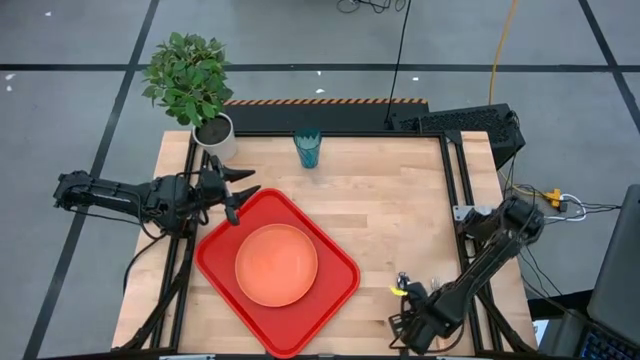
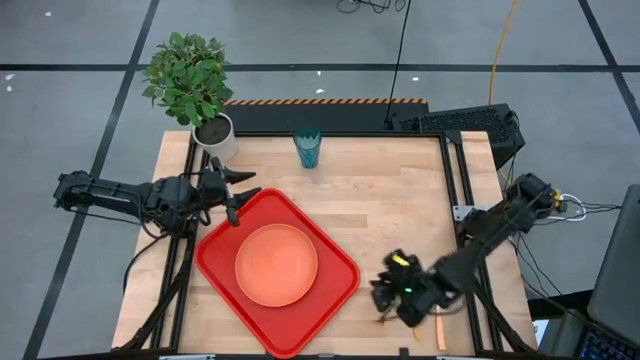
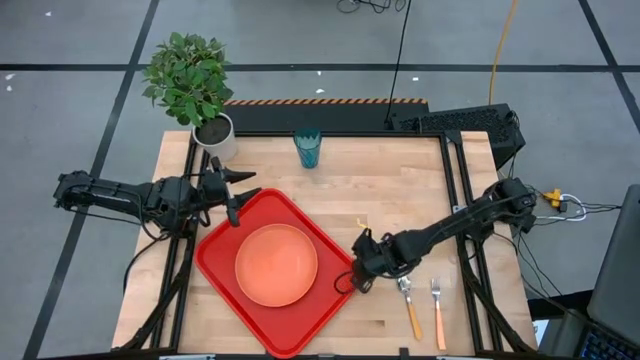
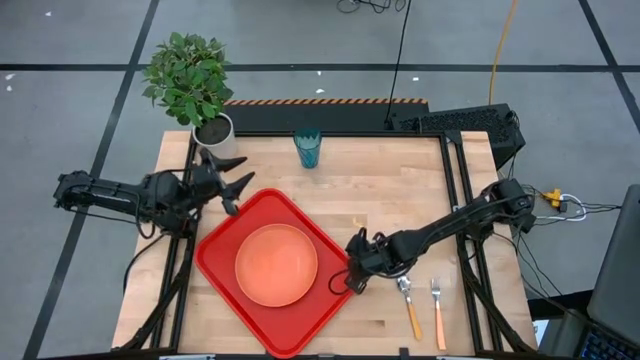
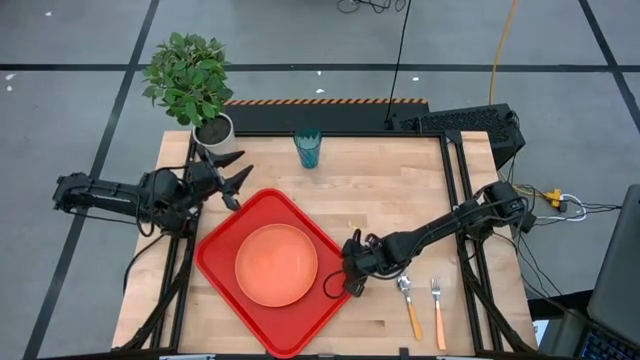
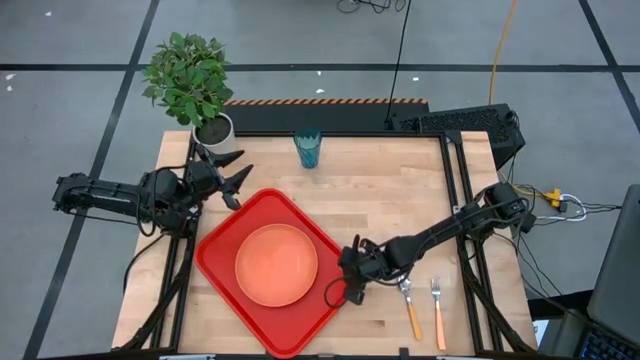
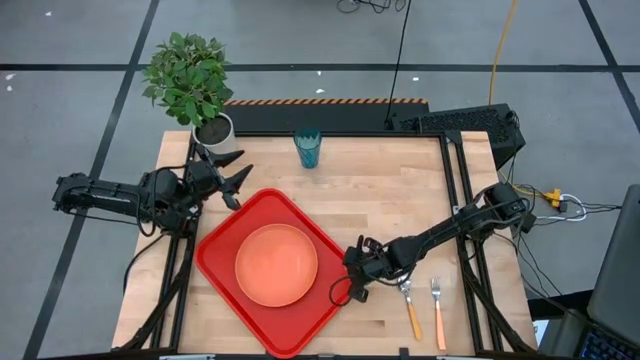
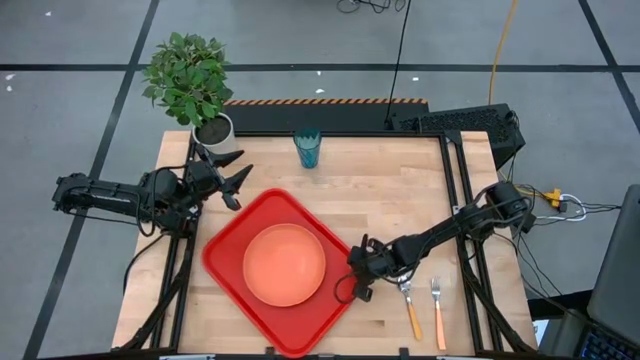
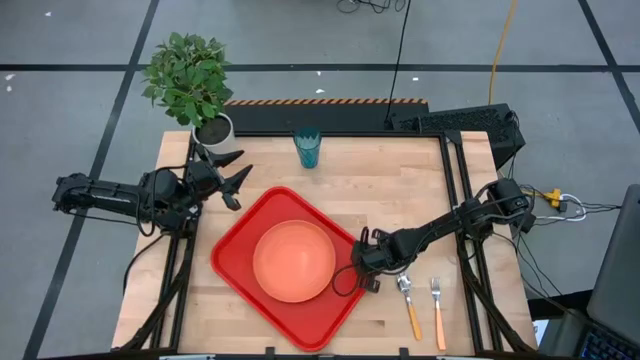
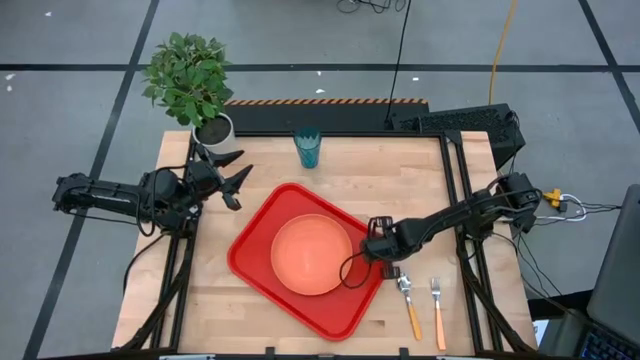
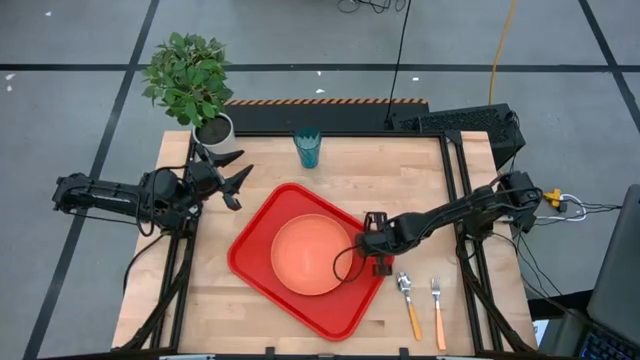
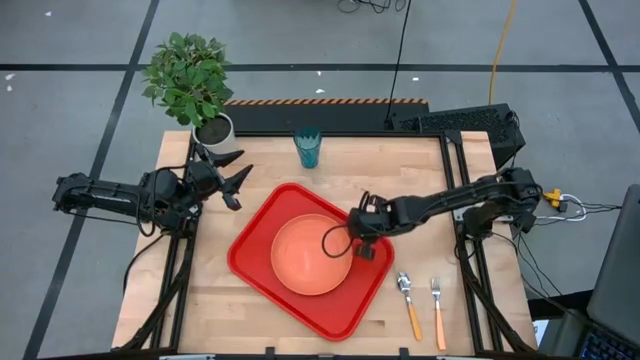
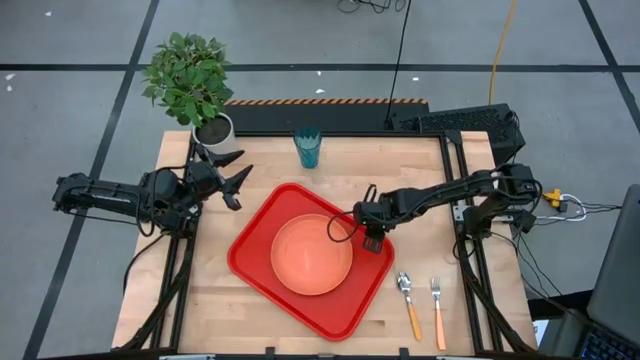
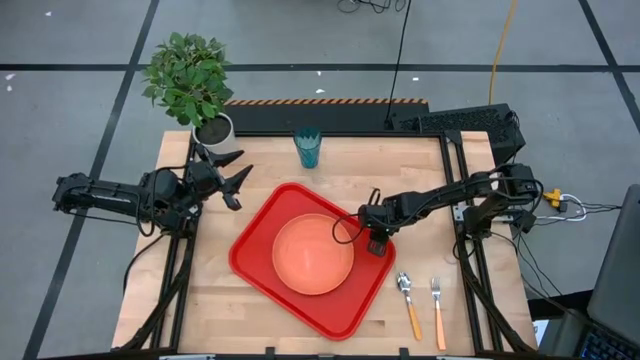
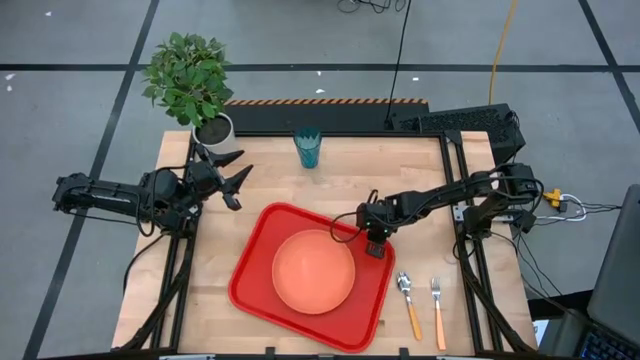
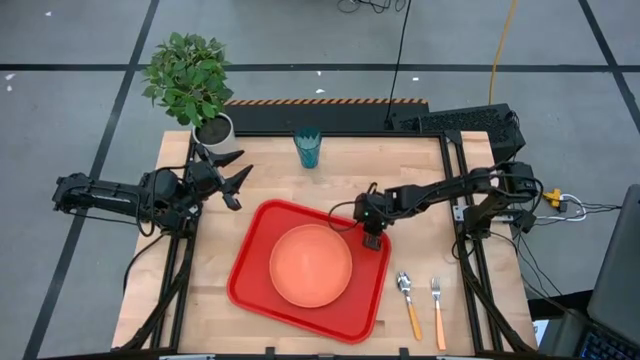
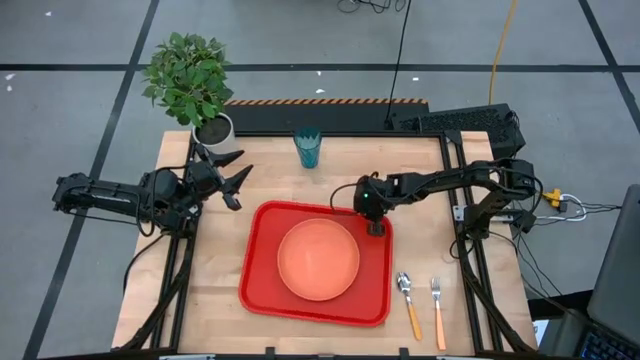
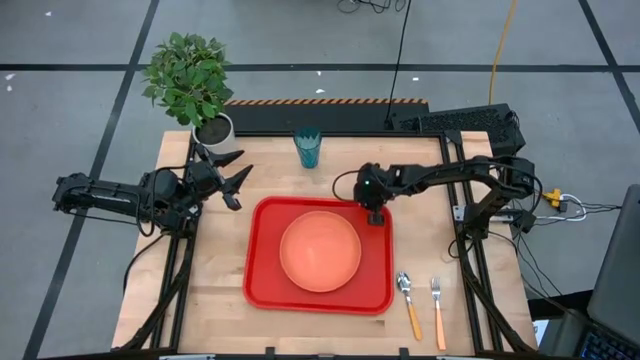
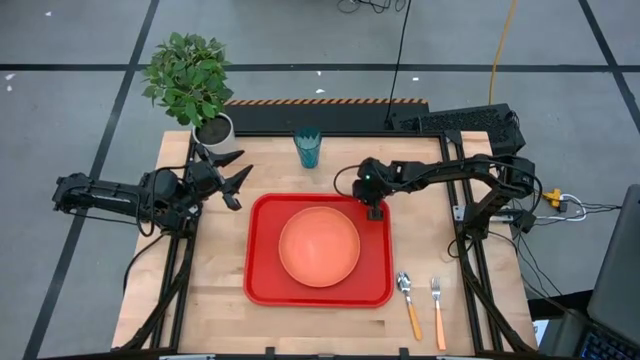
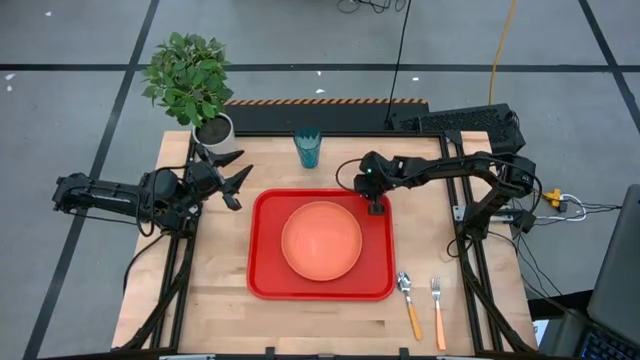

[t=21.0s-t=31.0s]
Task: Pick and place plate/cup/fork/spoon on tray
Move the red tray to the center of the table

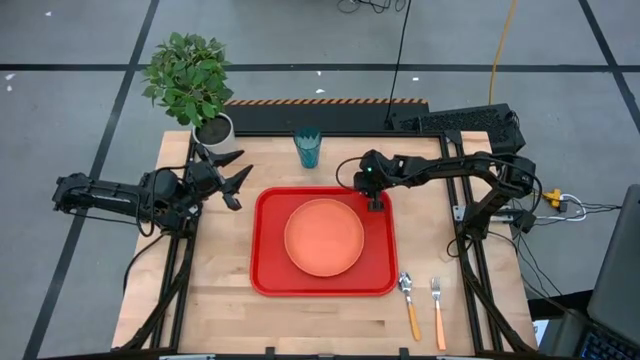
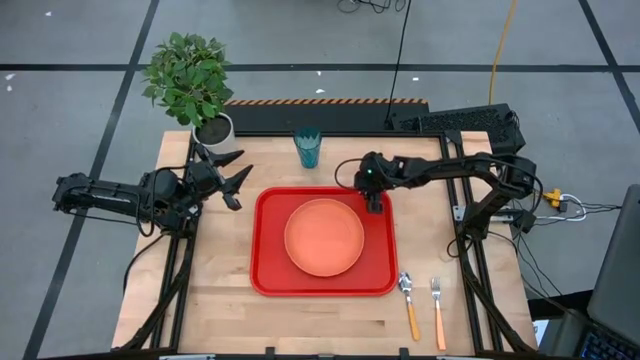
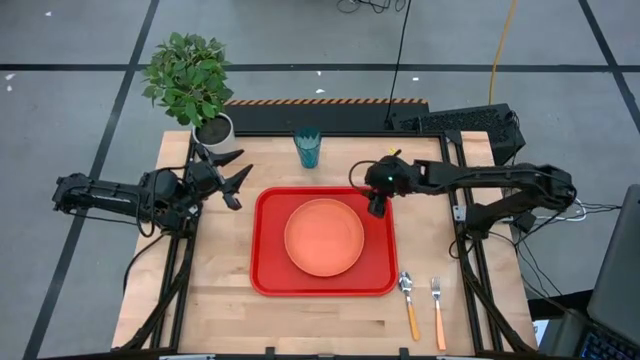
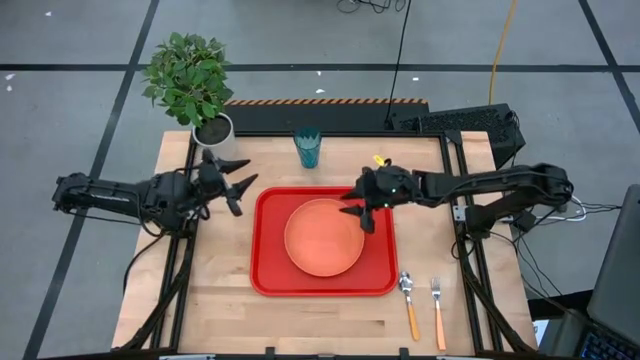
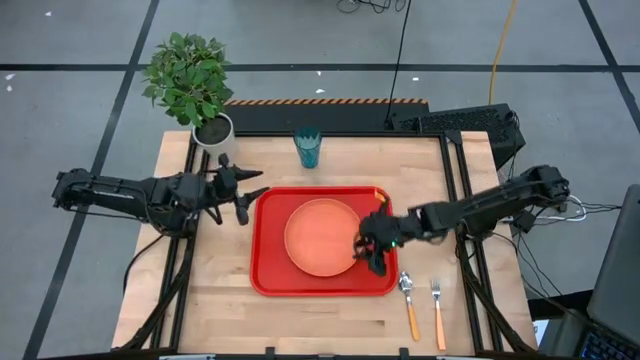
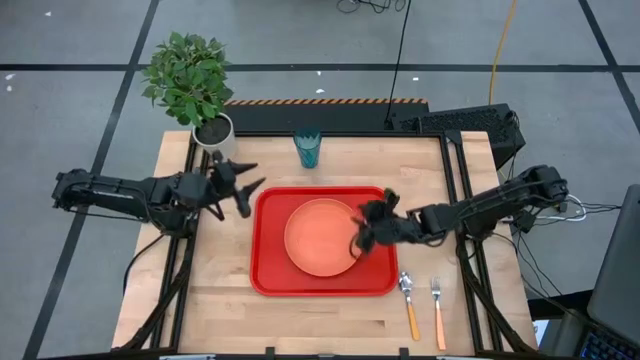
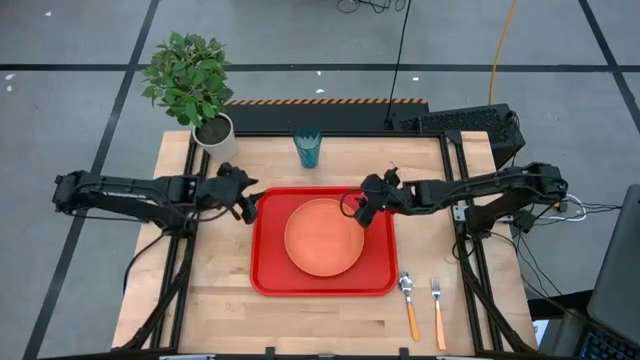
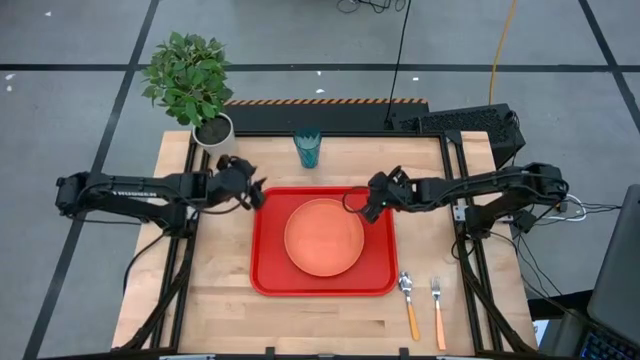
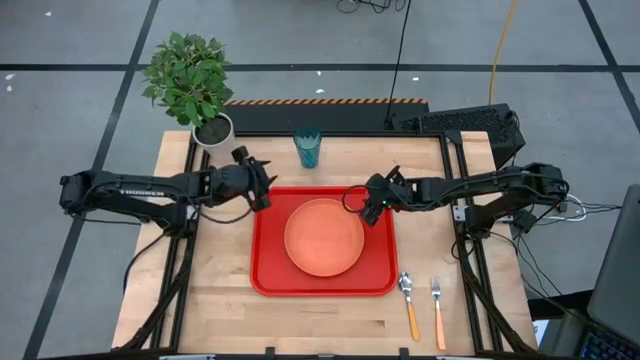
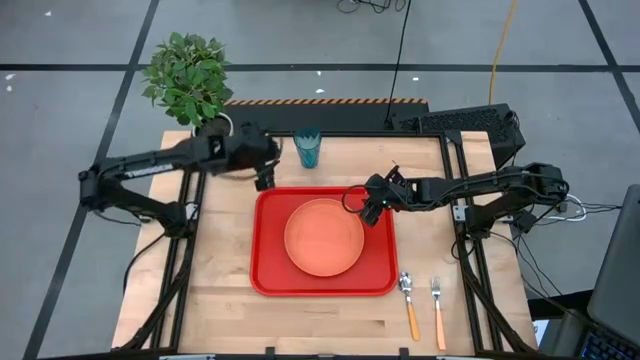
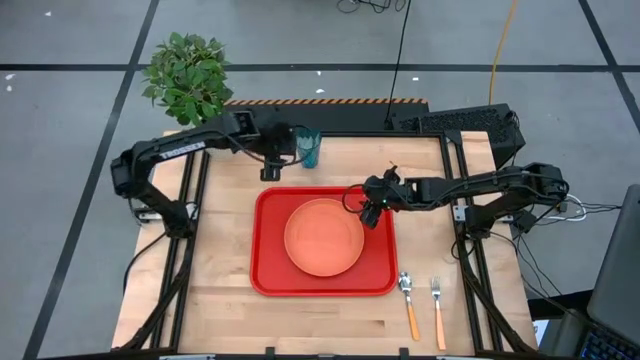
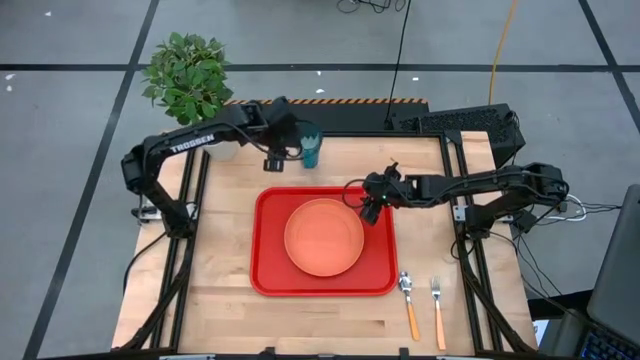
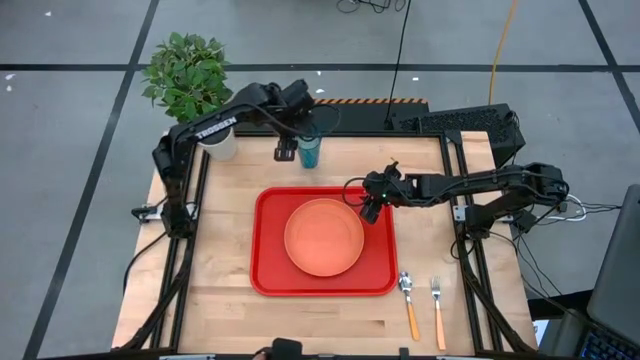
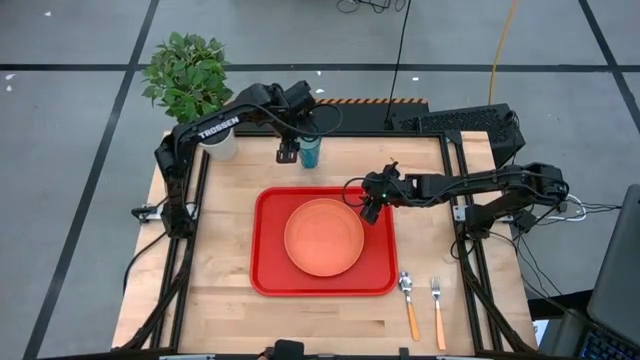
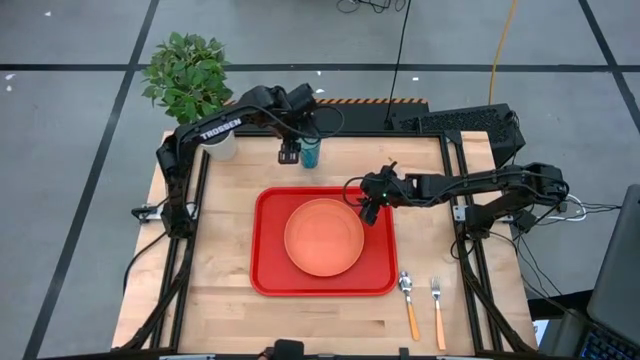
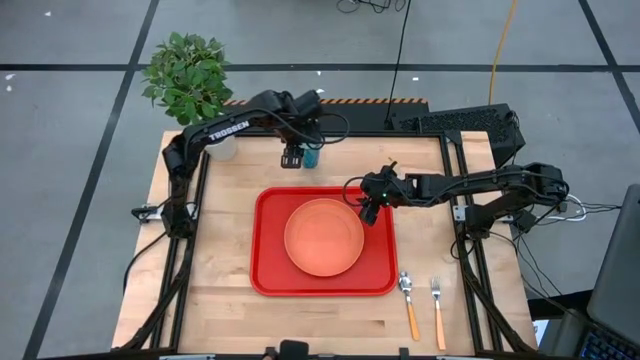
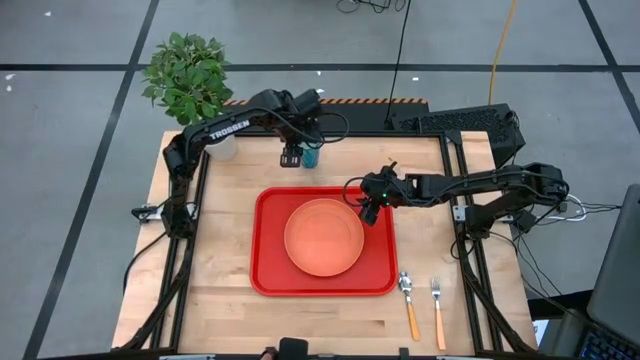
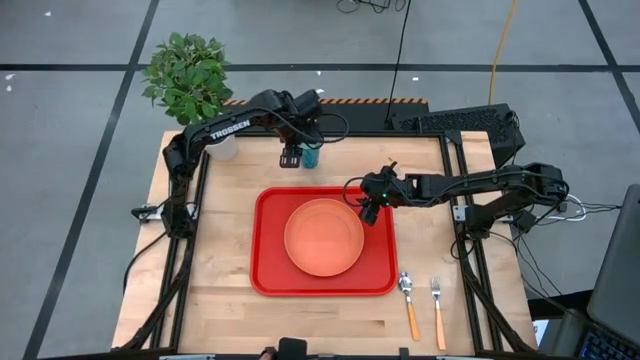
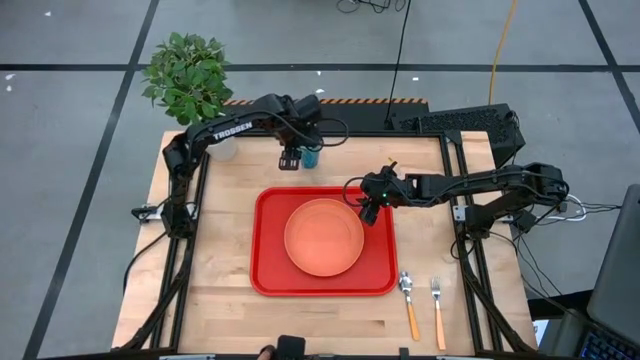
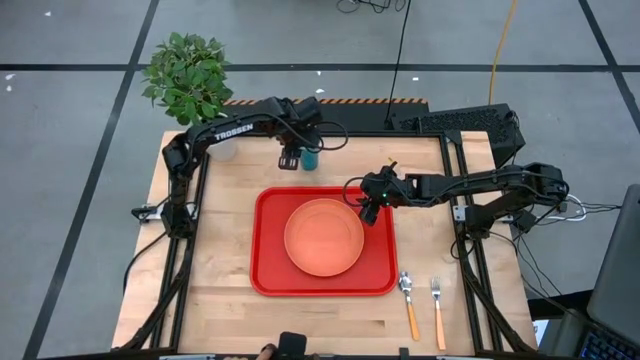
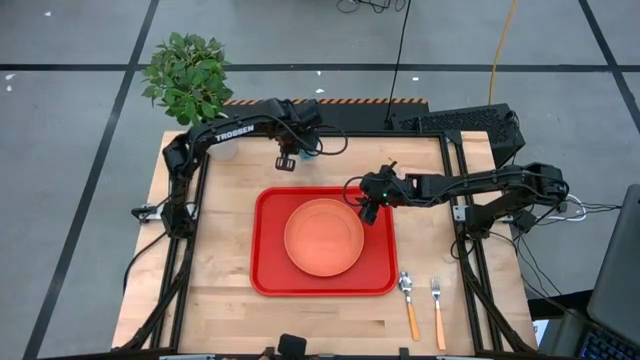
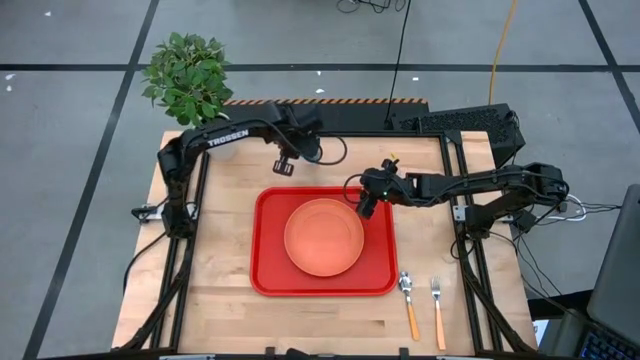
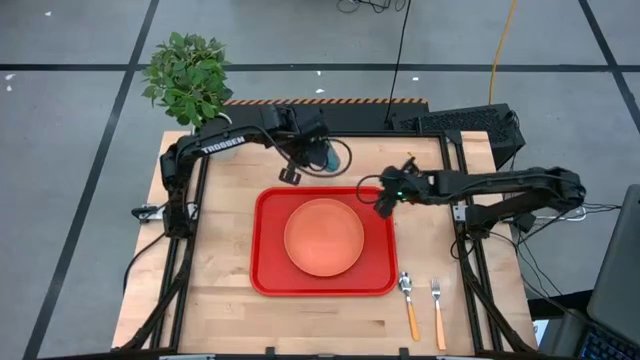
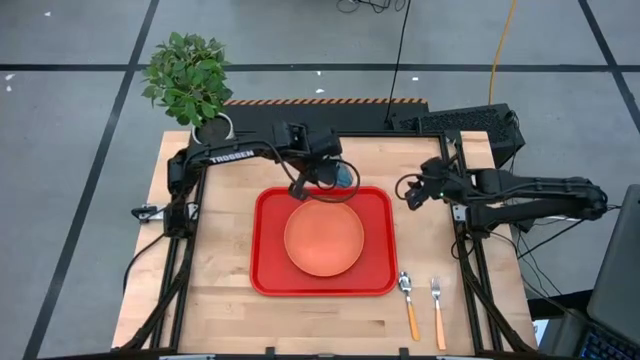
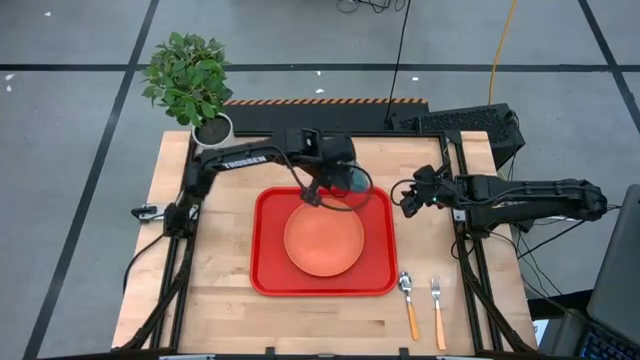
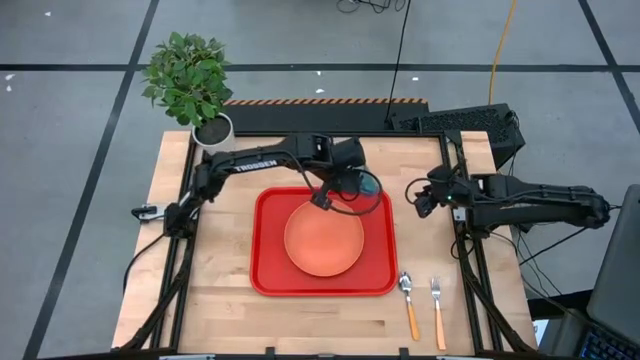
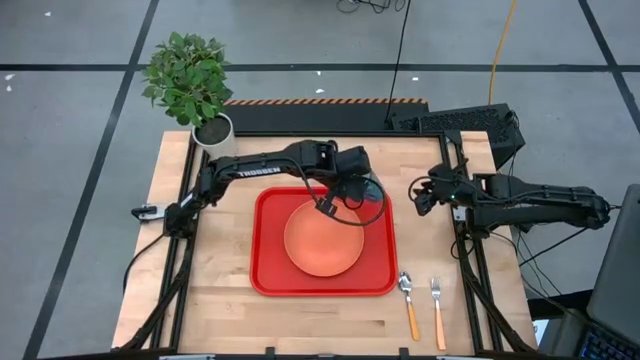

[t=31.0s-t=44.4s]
Put the blue cup on the red tray to the top right of the orange plate
